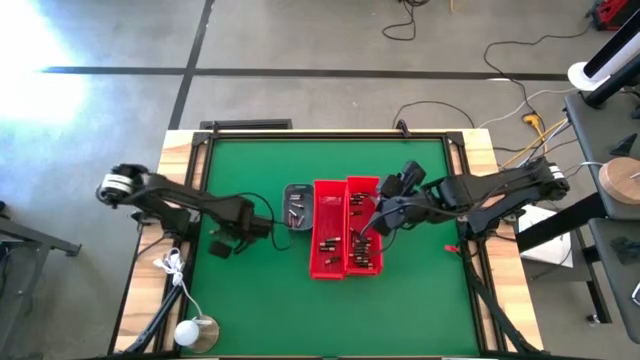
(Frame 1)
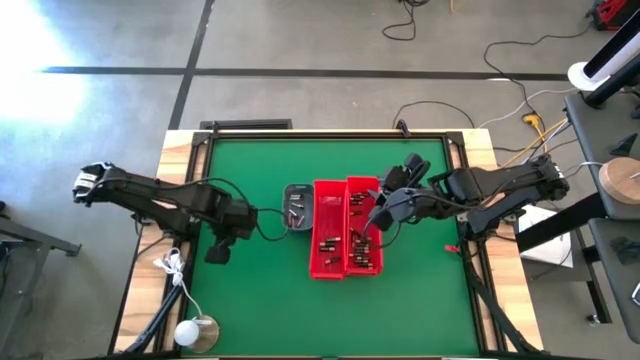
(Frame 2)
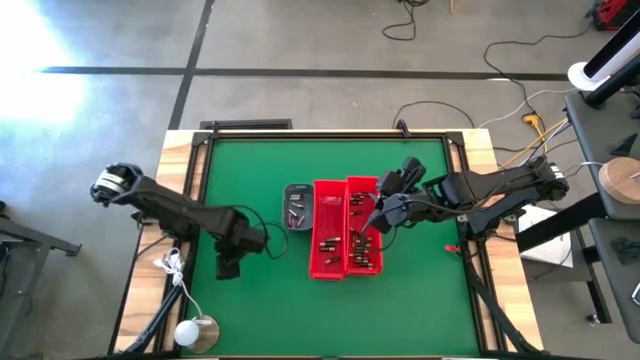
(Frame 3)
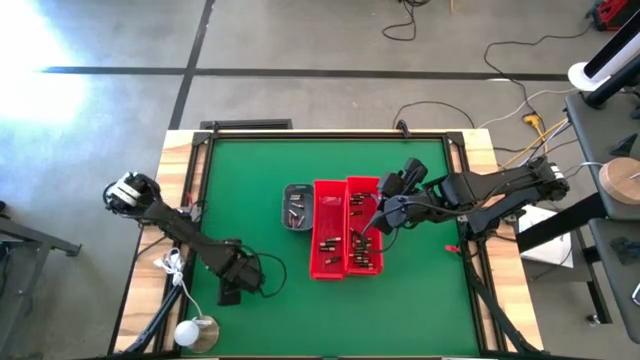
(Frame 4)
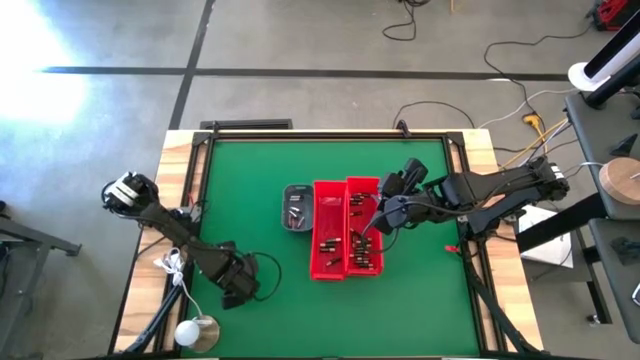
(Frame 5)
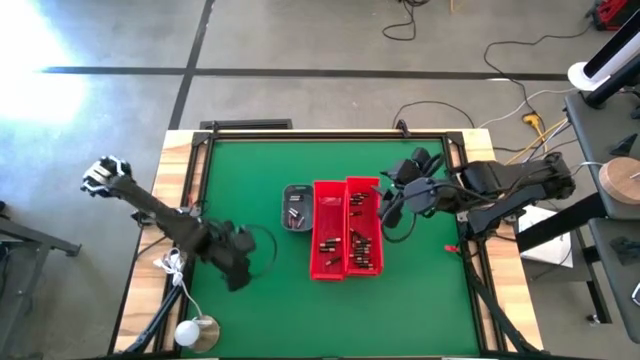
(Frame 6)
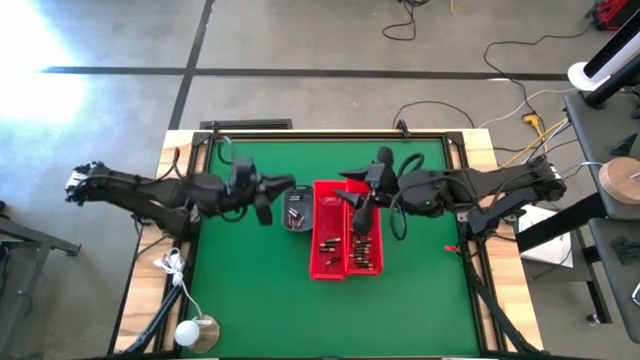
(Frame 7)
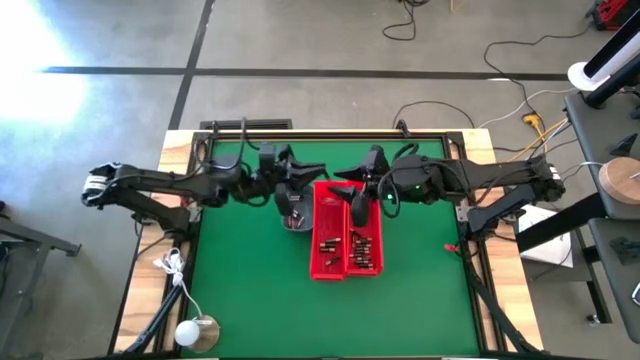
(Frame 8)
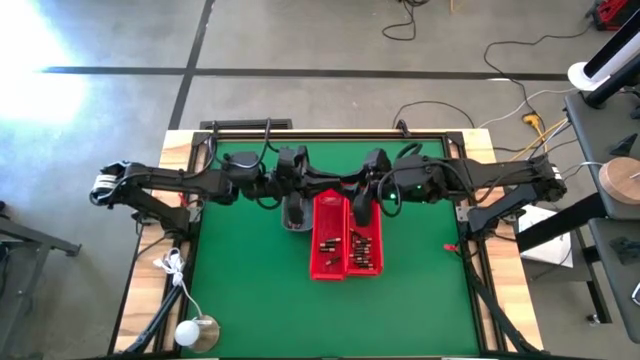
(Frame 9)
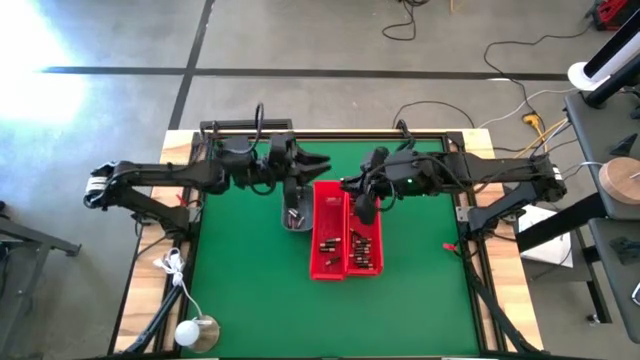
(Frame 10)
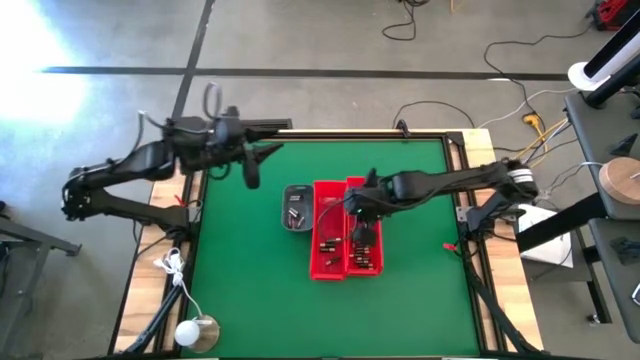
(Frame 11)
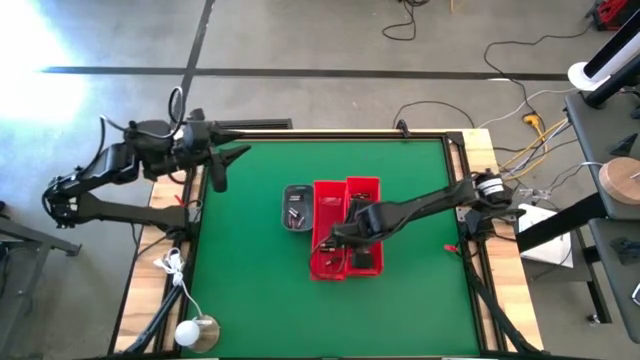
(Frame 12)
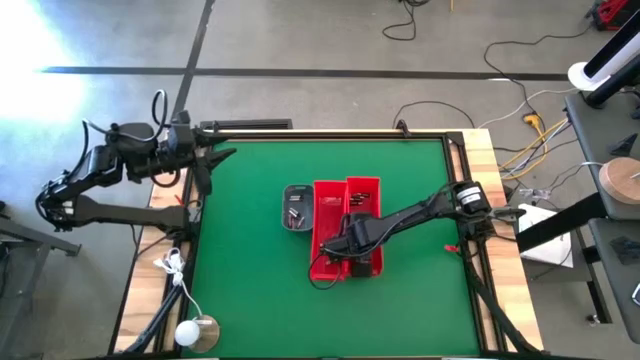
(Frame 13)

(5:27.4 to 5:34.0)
Task: Sort batteries
Put the small black battery into the right red bin

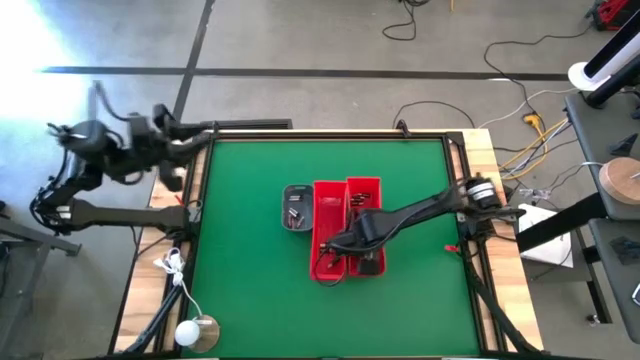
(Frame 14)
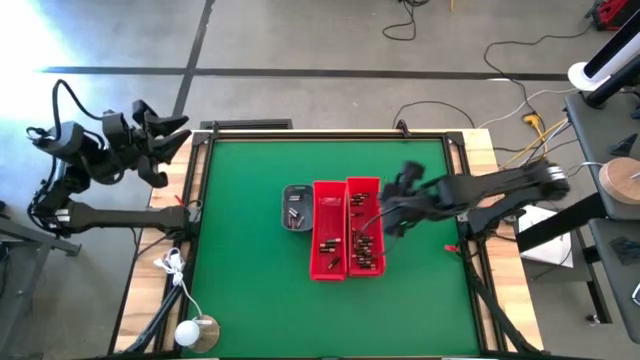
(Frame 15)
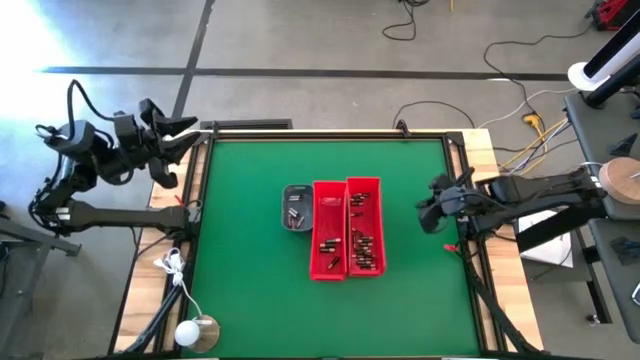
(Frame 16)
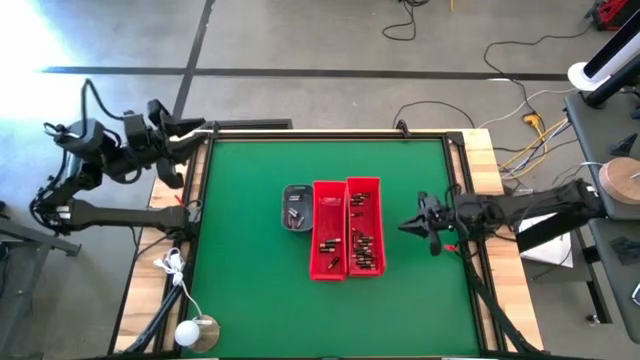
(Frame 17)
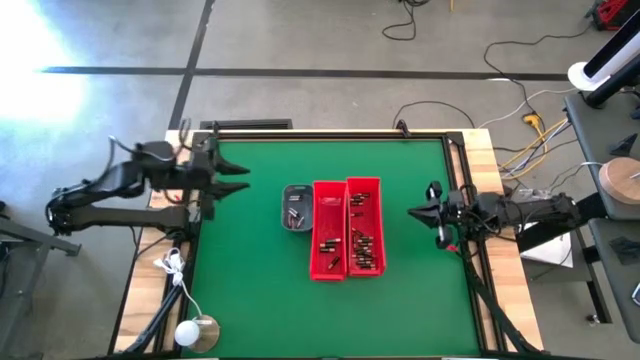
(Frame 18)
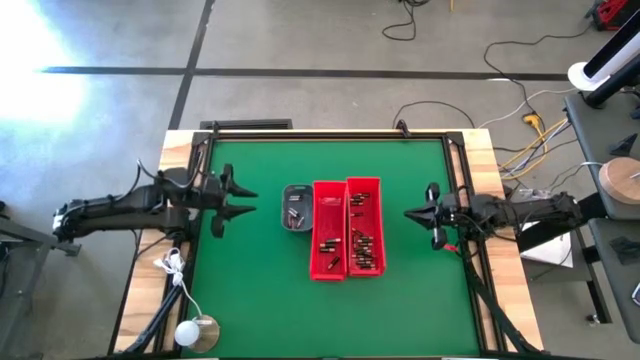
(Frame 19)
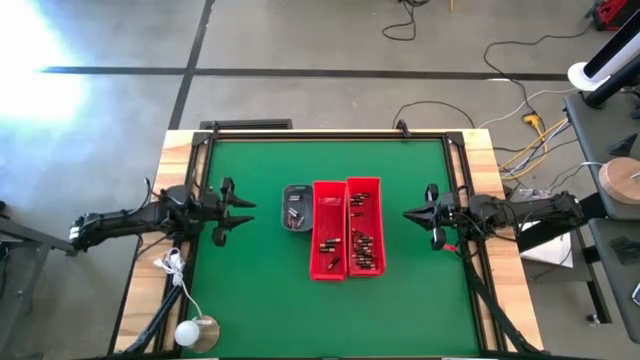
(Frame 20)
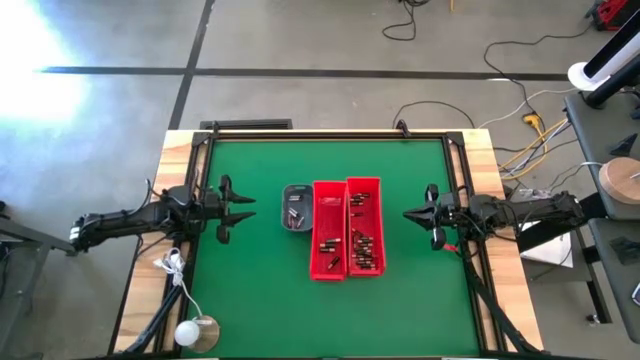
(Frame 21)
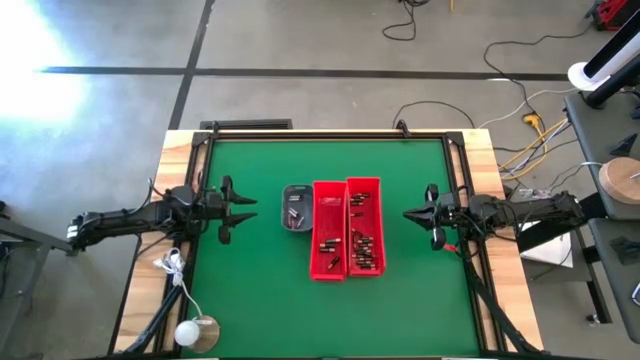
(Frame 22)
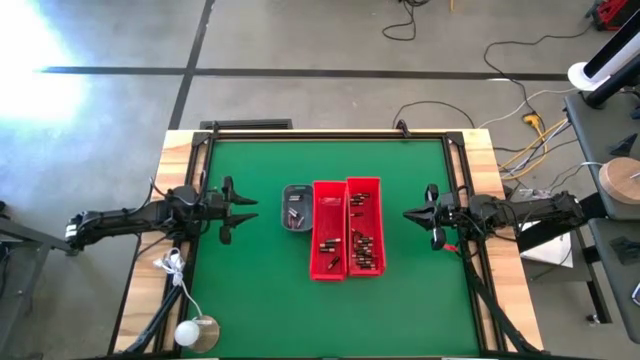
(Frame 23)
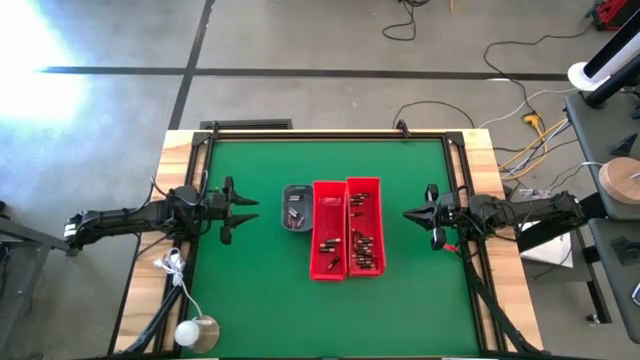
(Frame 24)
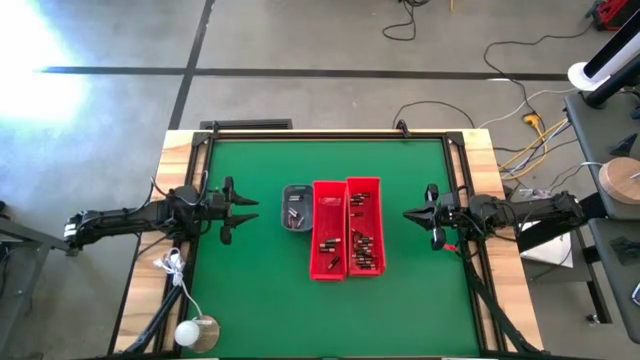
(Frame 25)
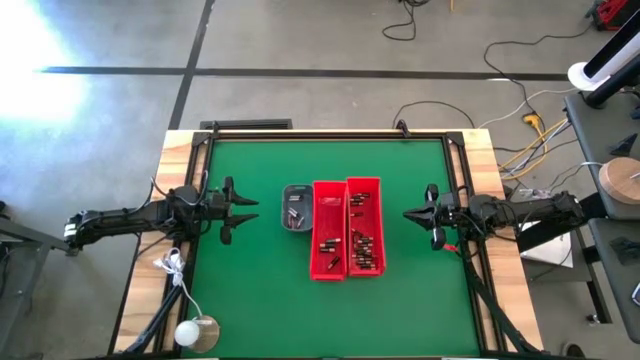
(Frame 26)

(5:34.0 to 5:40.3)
Return to Home Position

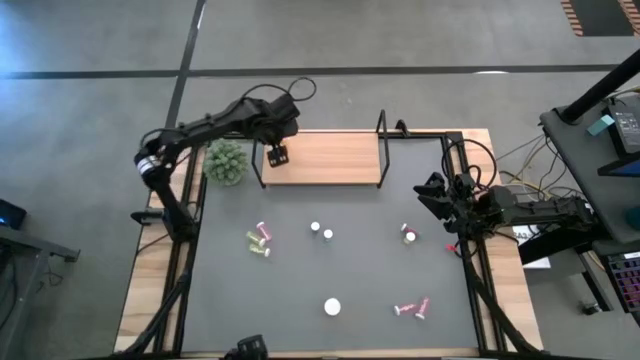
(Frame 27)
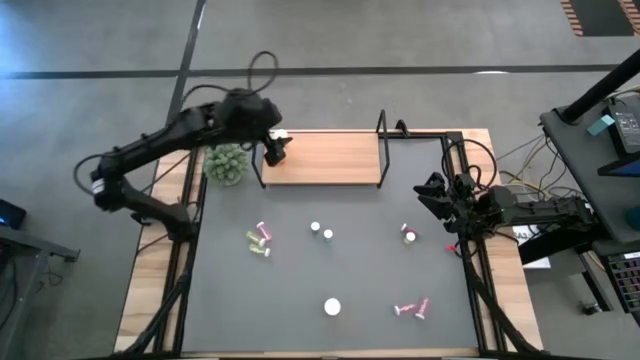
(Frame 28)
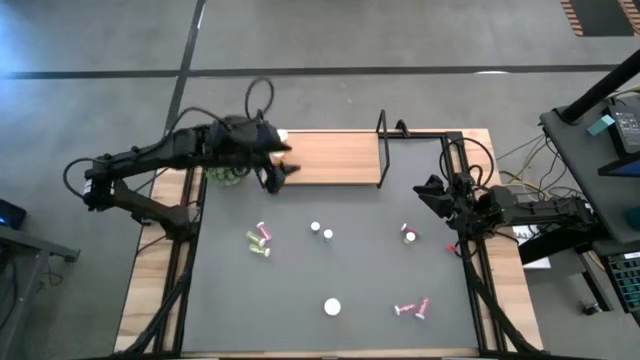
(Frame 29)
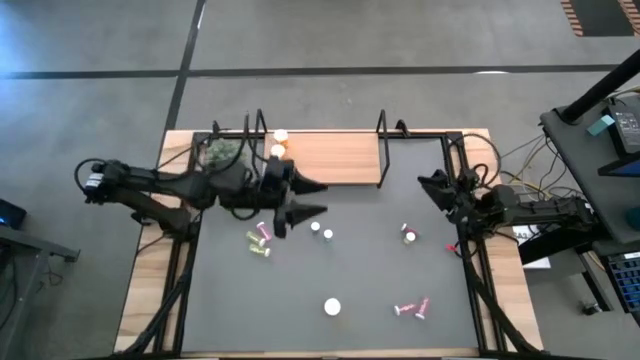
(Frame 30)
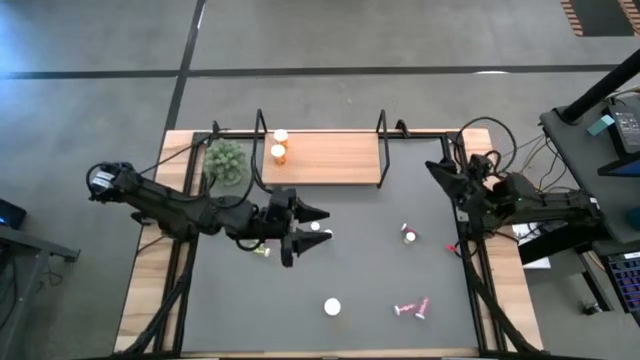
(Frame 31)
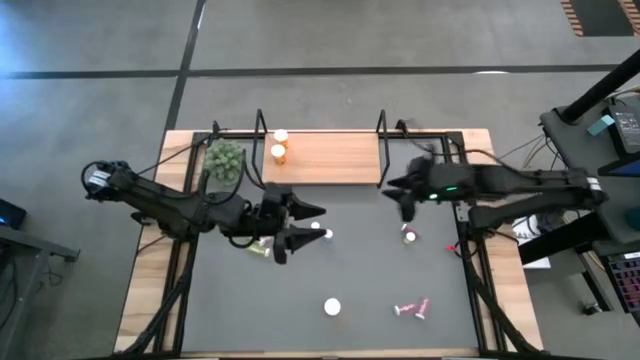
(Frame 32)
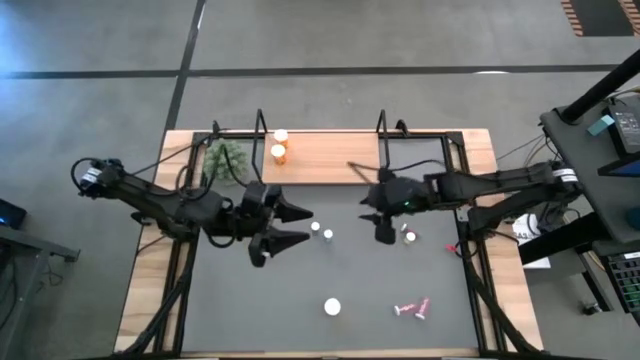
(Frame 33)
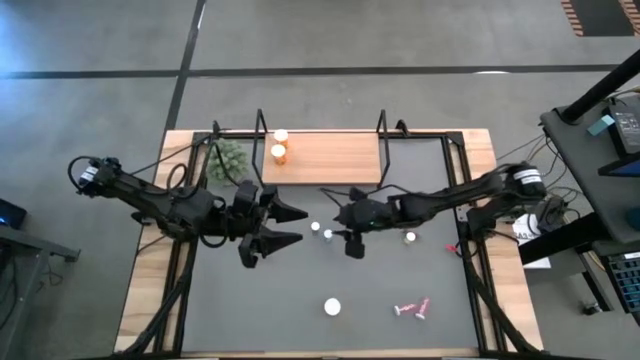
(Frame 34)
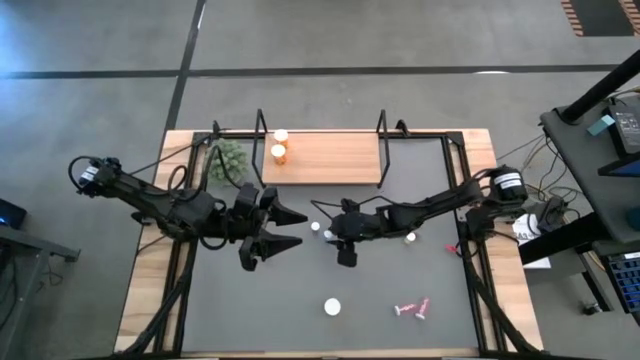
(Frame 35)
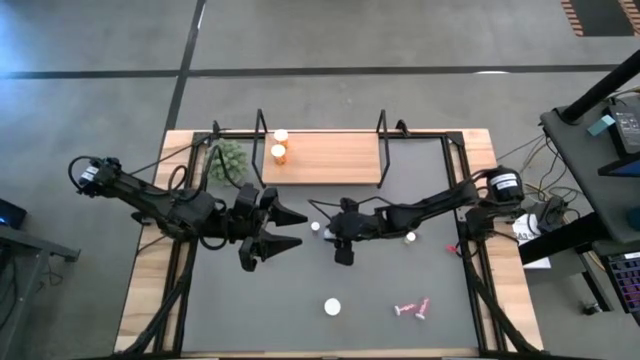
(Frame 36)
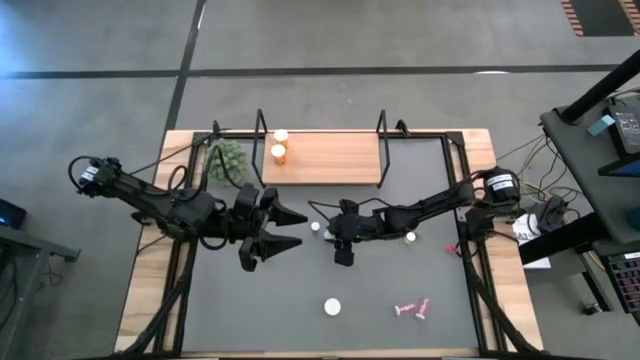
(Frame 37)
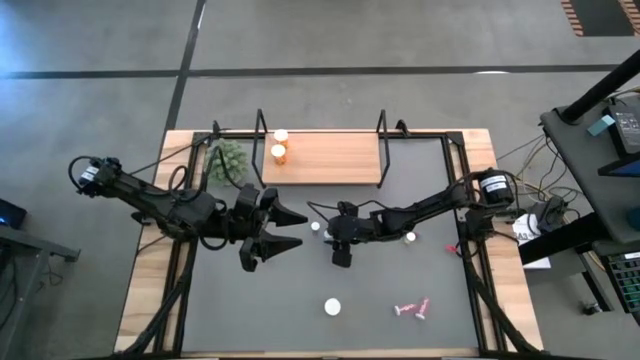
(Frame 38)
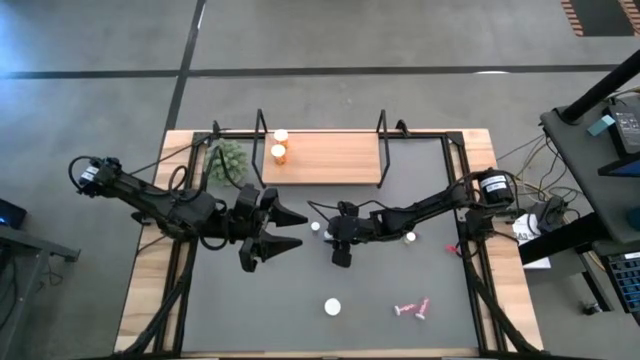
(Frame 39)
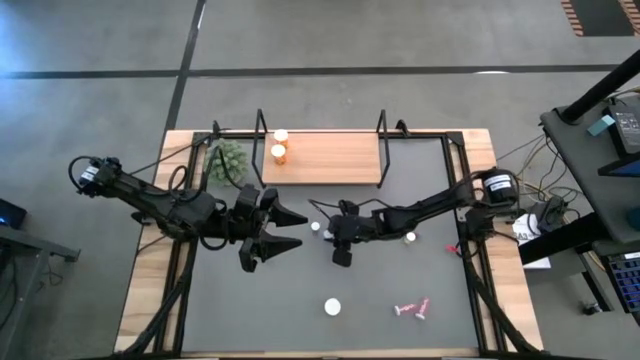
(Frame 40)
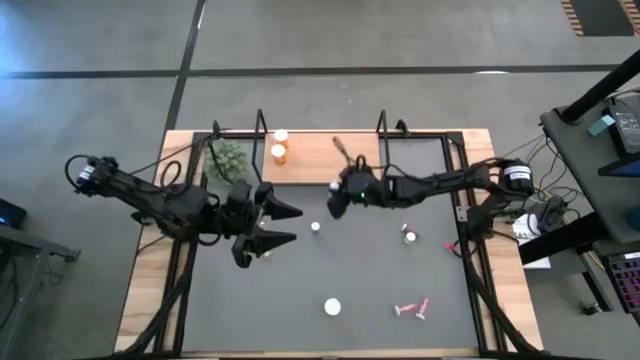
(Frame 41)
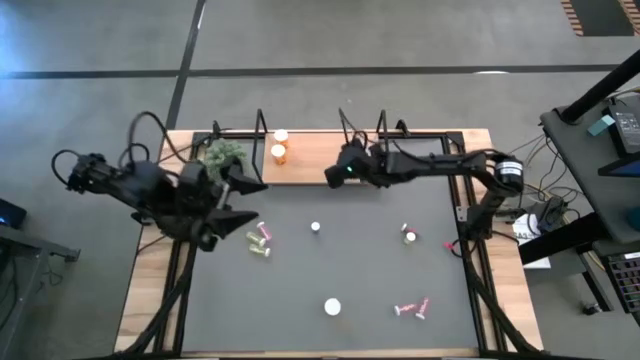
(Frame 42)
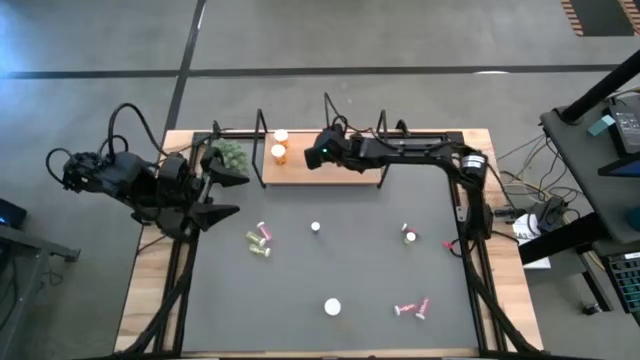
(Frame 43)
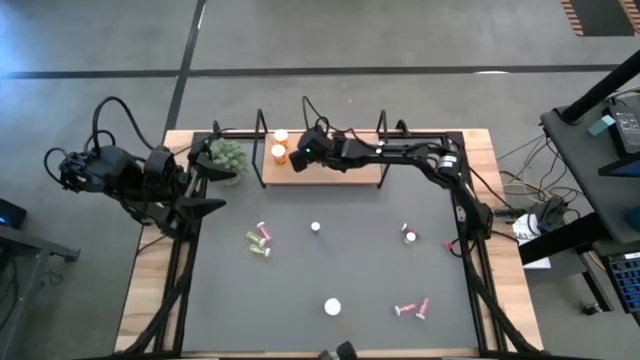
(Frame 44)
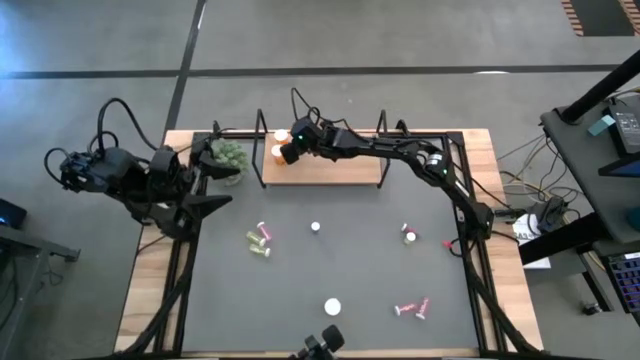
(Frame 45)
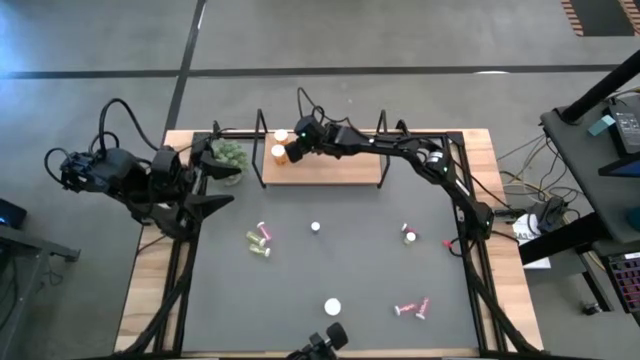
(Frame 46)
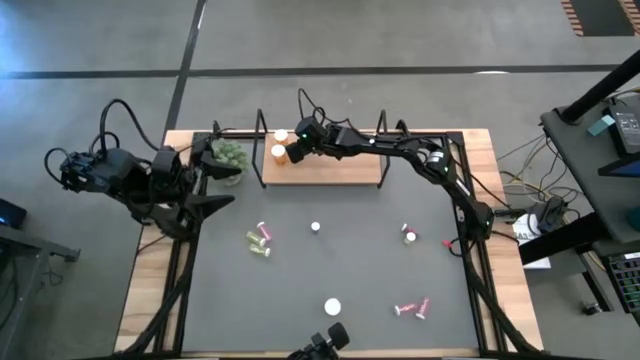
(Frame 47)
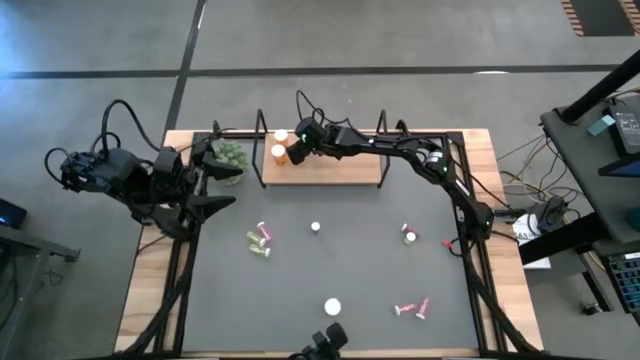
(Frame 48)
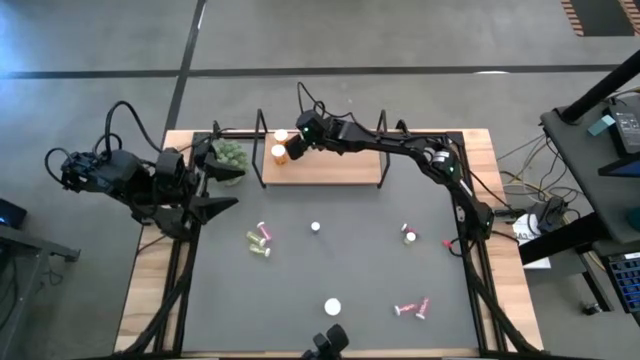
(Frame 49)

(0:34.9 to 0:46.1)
Task: Pick and place medicine bottles onto shelf by color
Put the middle blue pill bottle on the shelf
